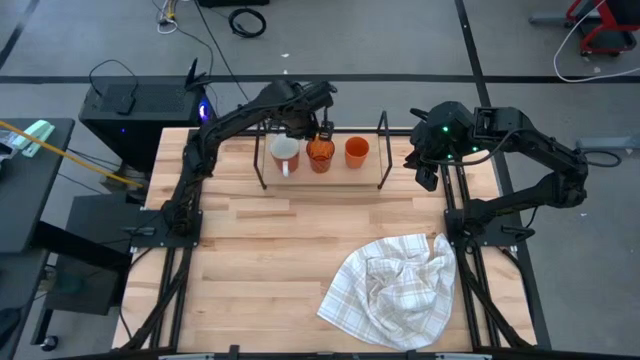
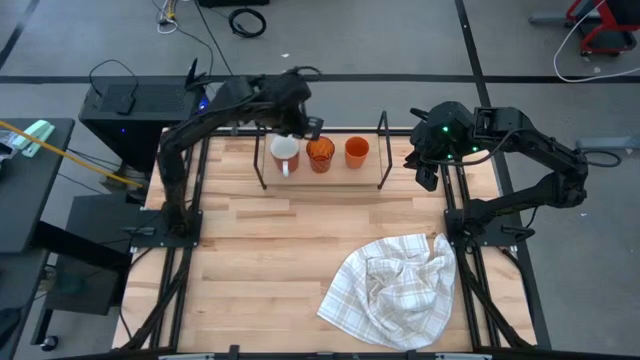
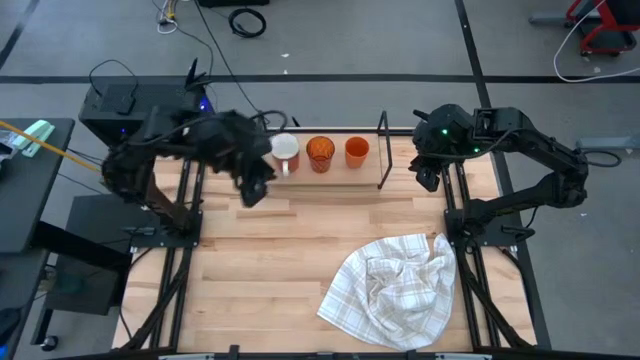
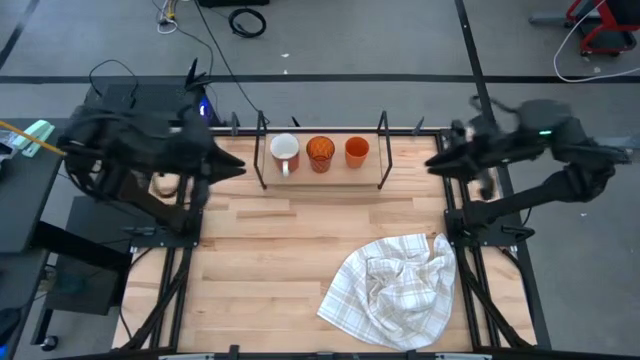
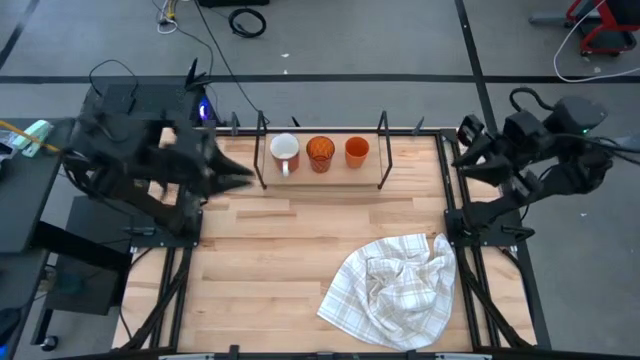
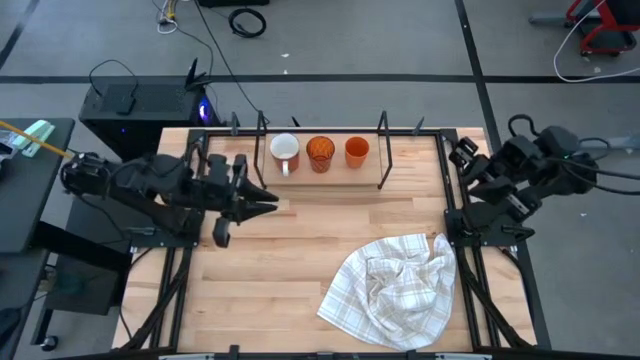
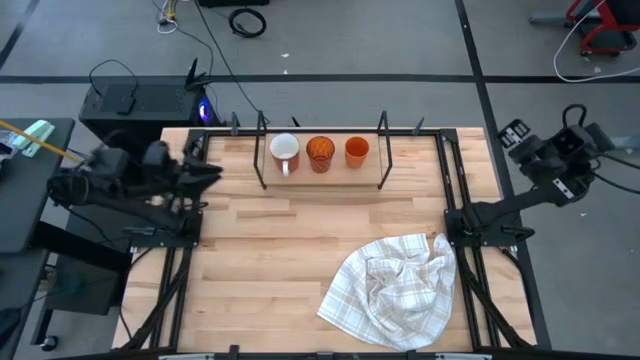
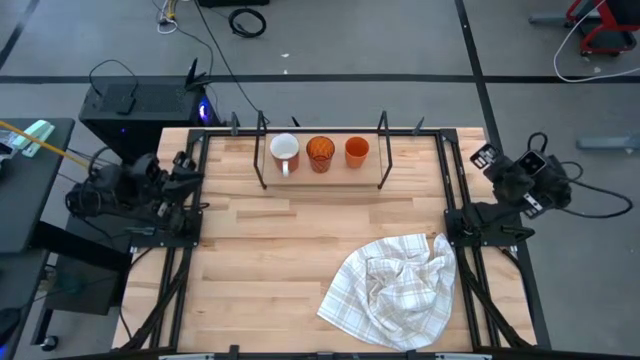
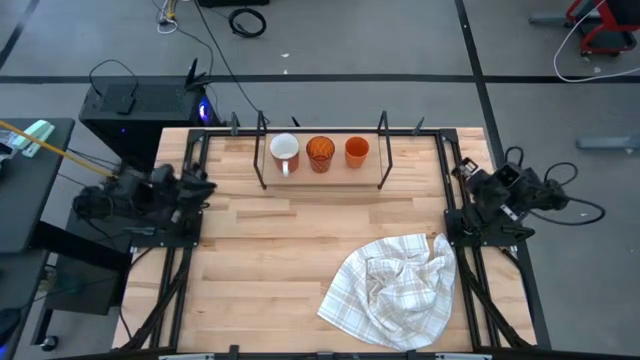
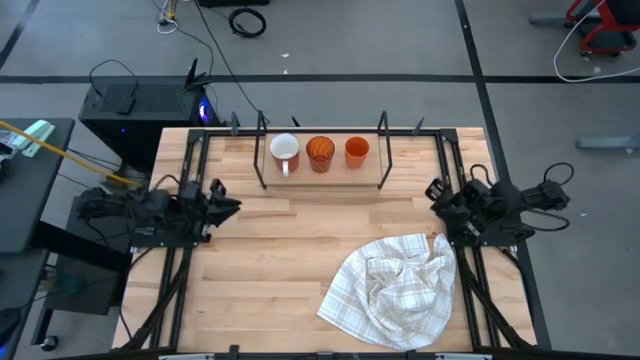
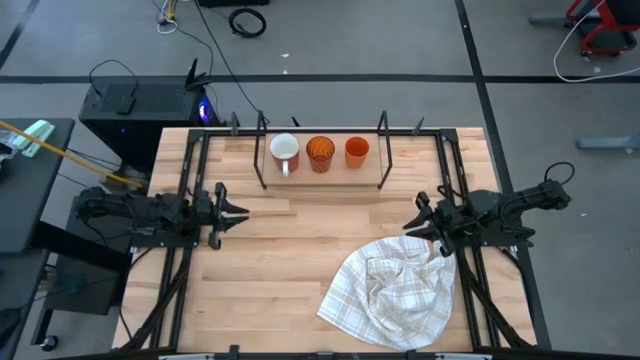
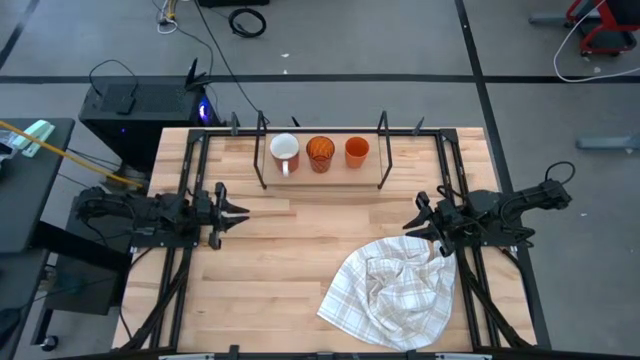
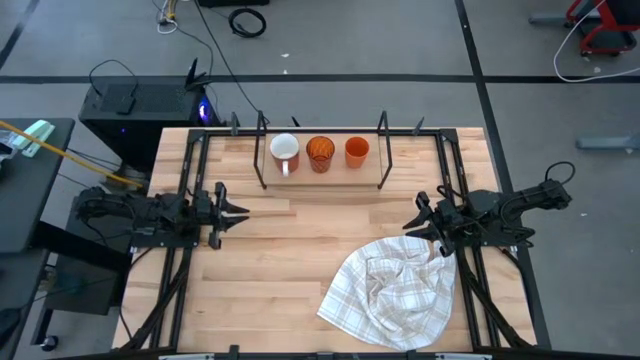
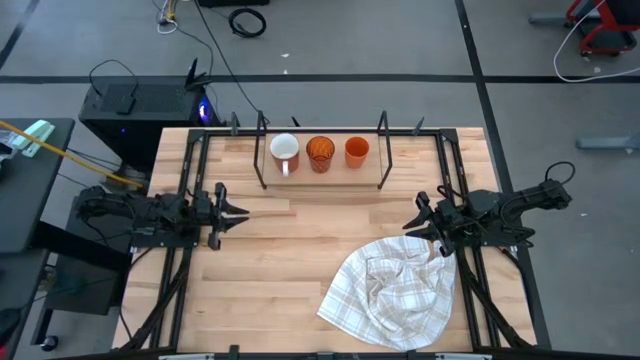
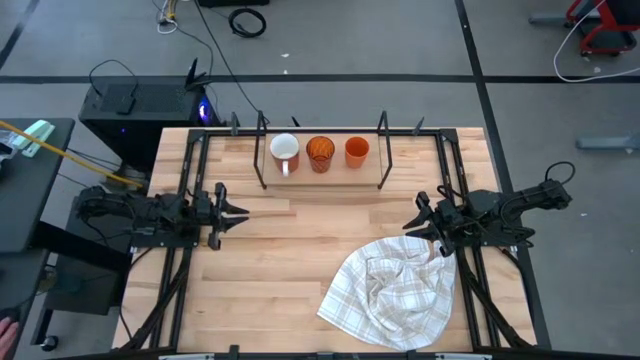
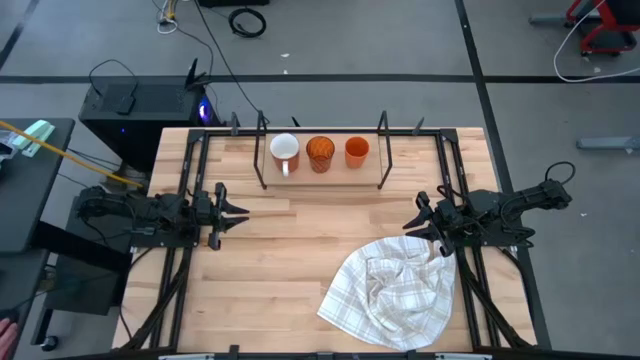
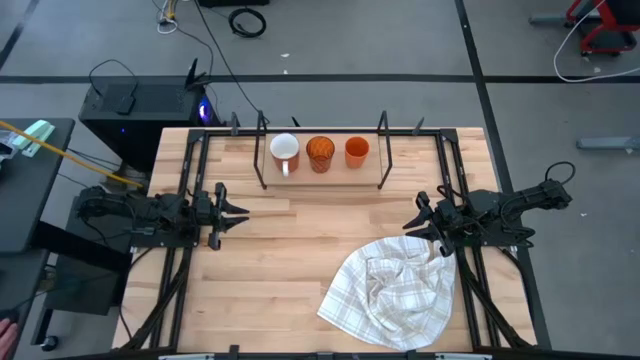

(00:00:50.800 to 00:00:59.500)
Task: Stack small to large cups/mugs on shelf
Return to Home Position

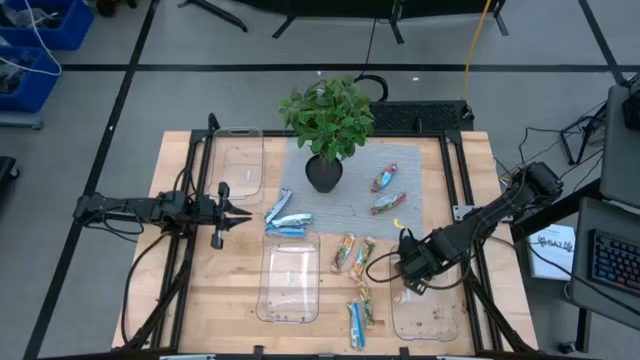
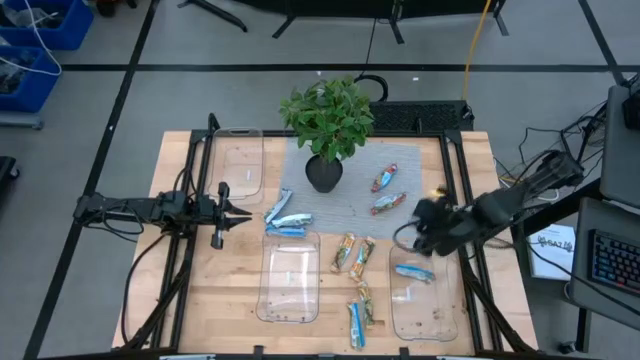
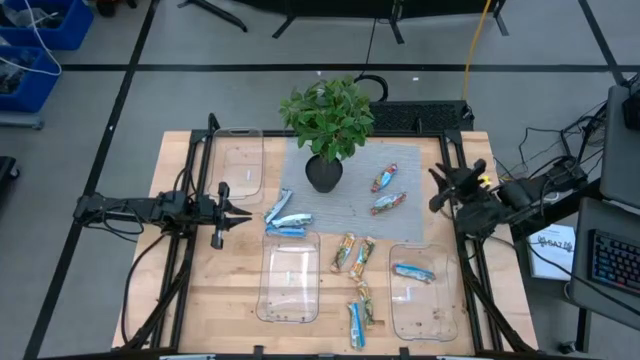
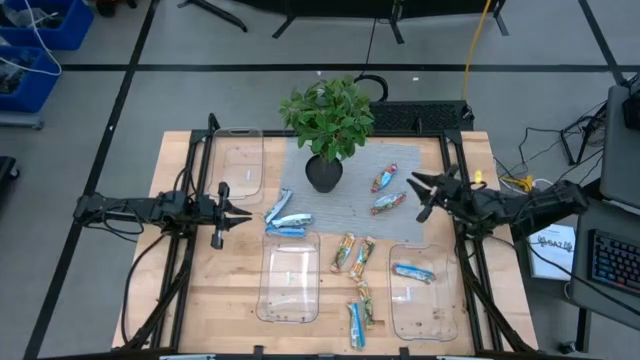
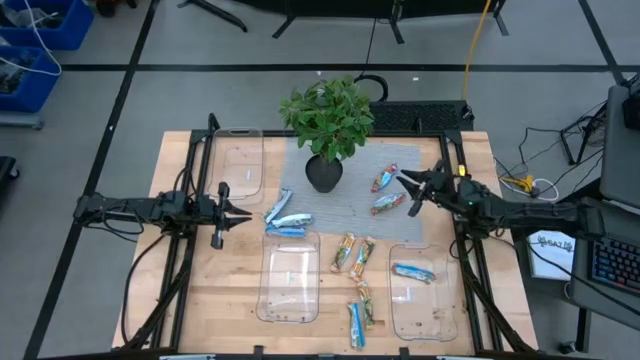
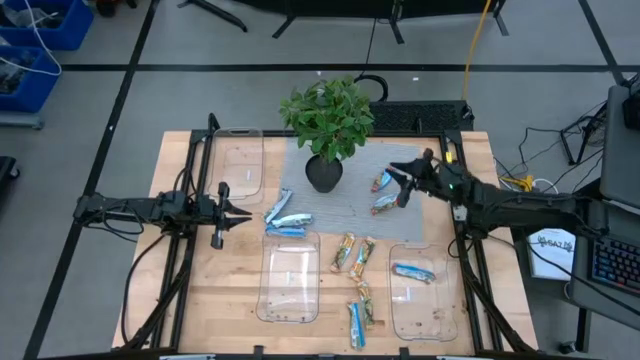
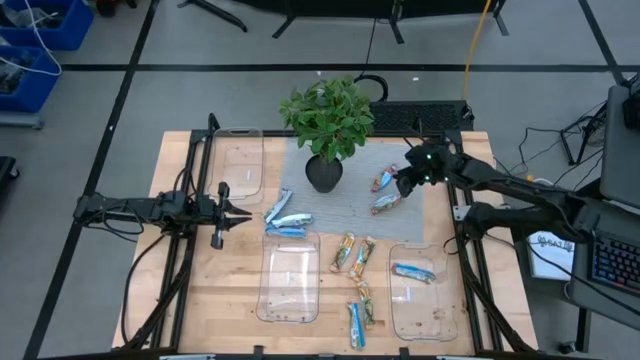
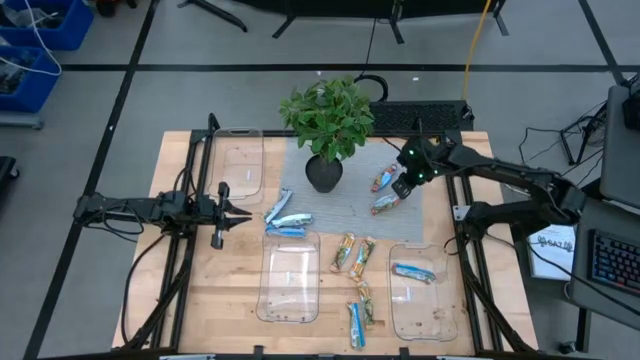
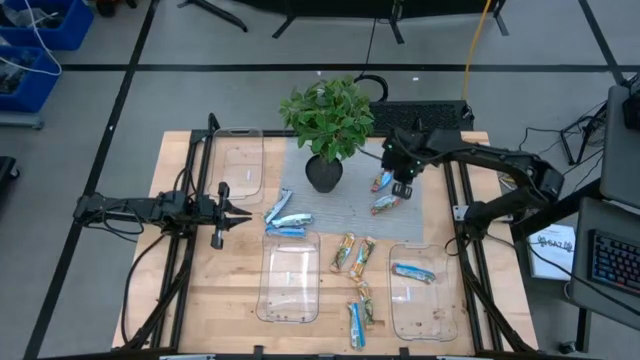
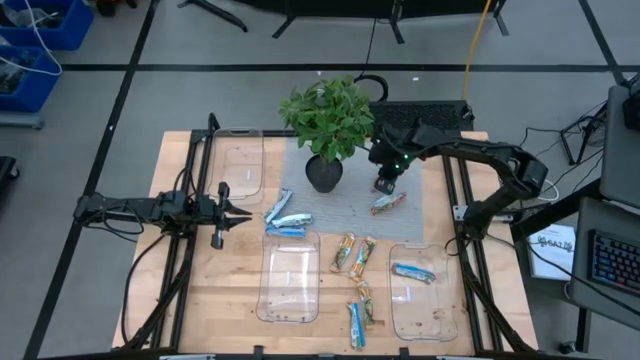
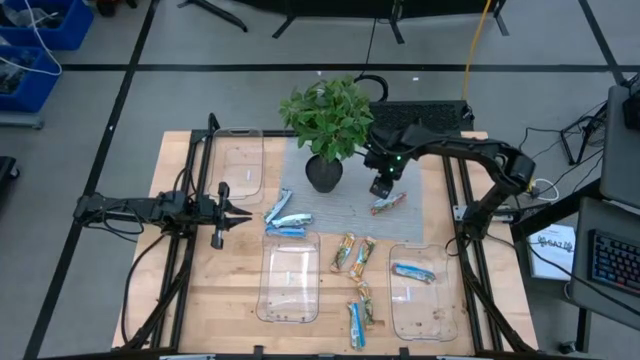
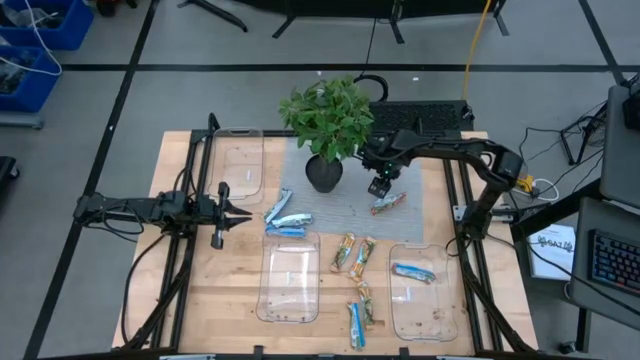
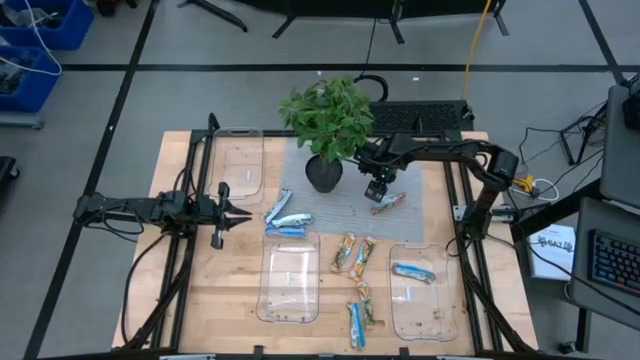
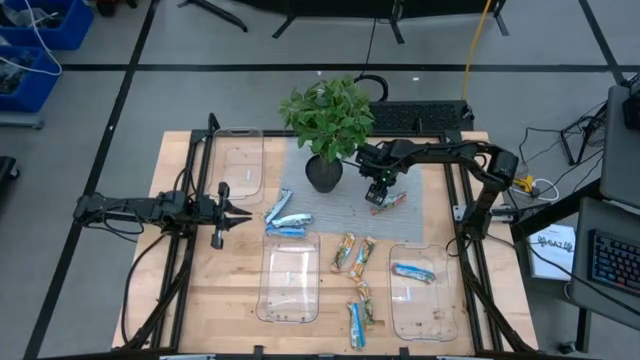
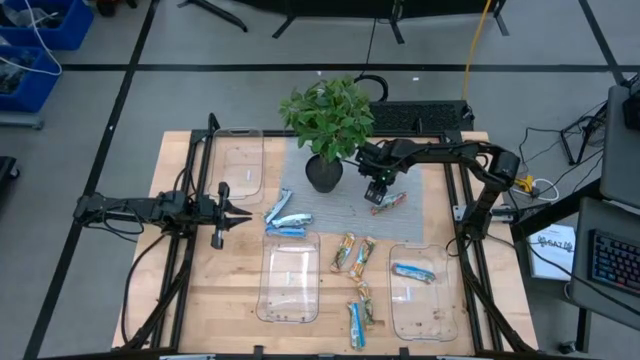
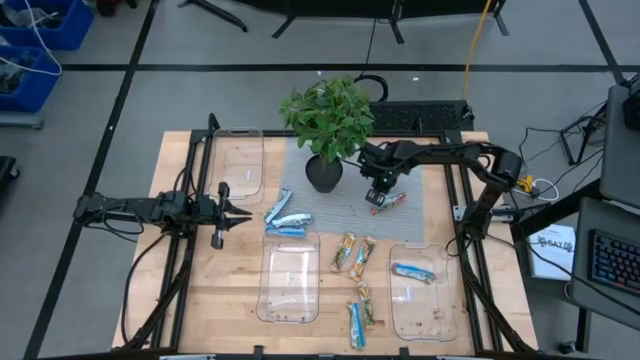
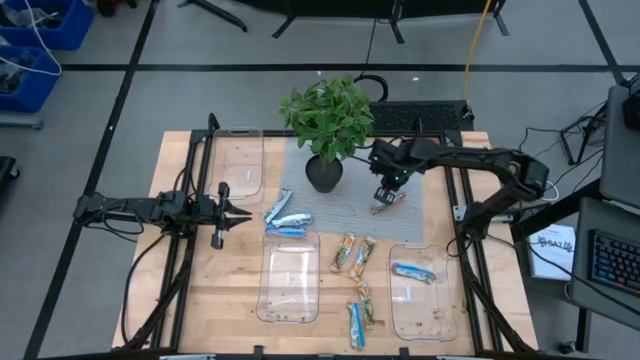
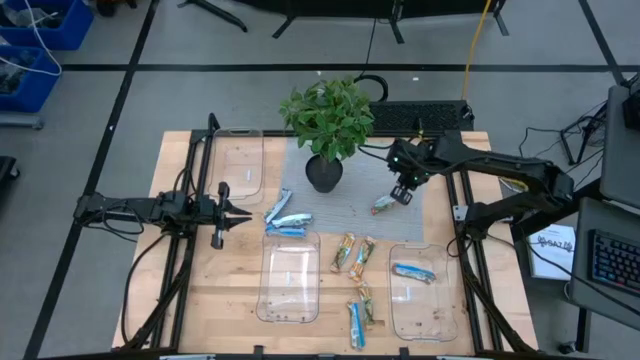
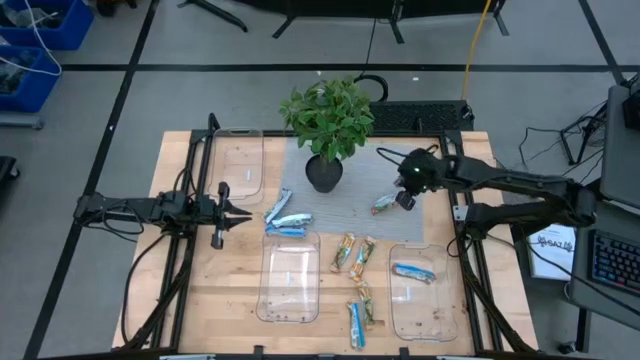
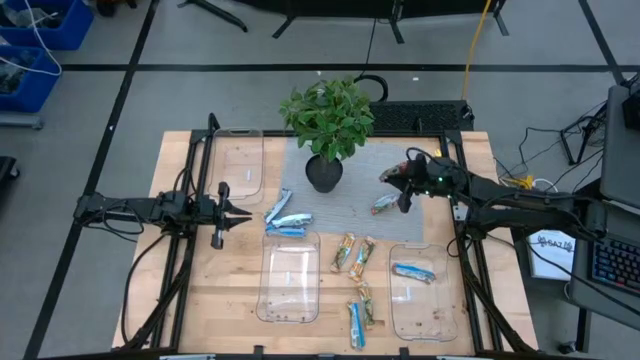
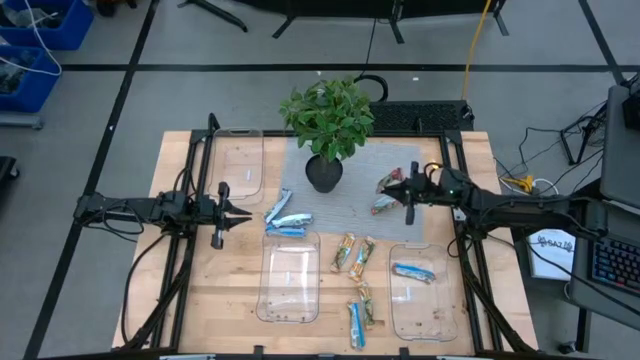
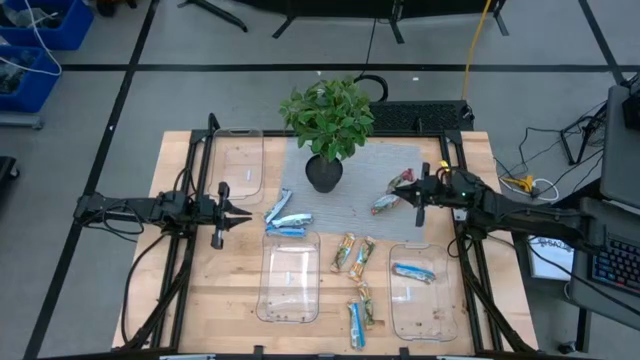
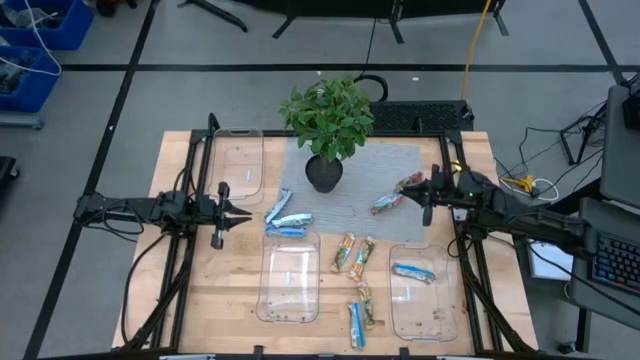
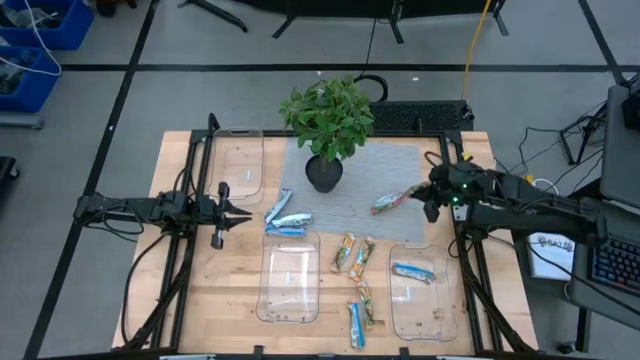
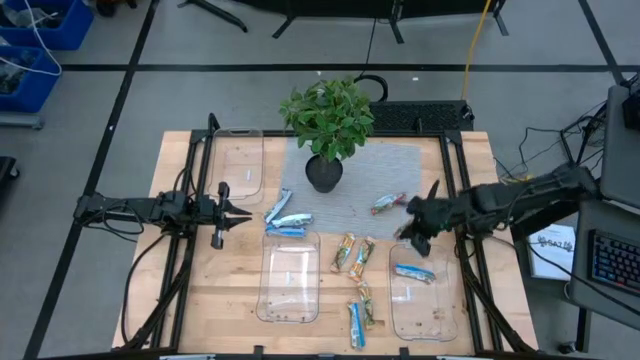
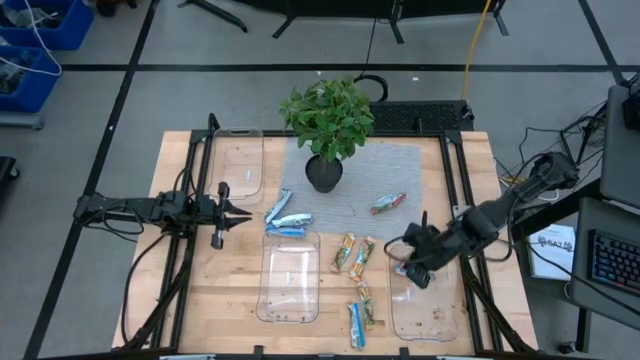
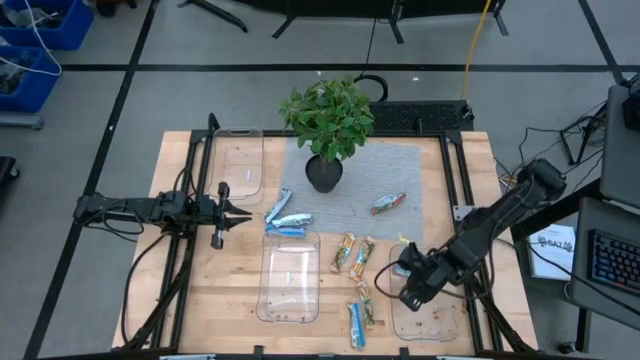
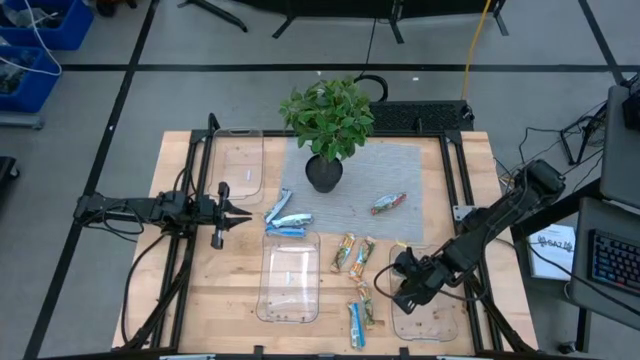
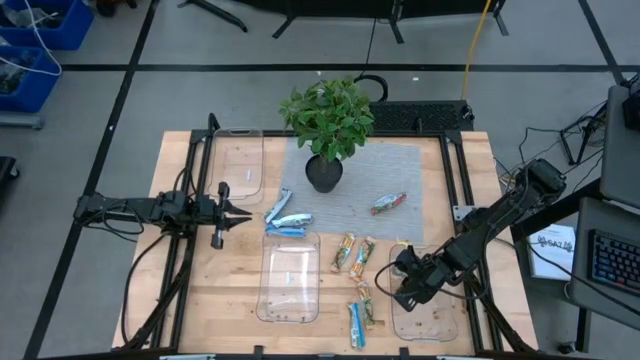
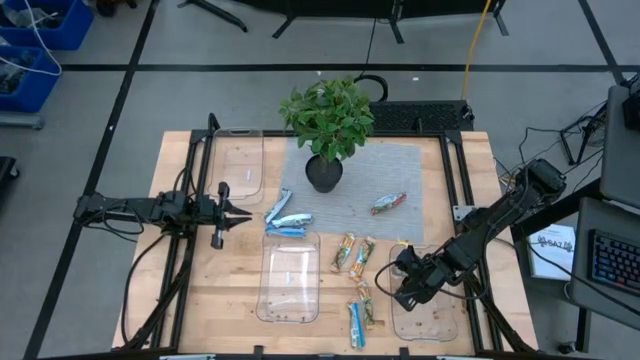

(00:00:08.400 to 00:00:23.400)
Task: Pick and place Granola Bars by type
Put the red granola bar into the bottom right transparent bin
